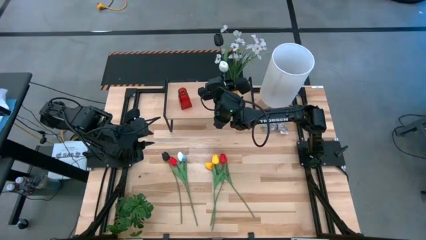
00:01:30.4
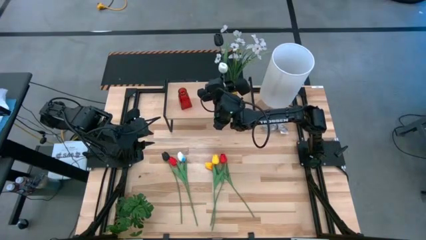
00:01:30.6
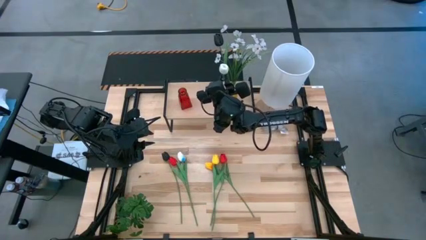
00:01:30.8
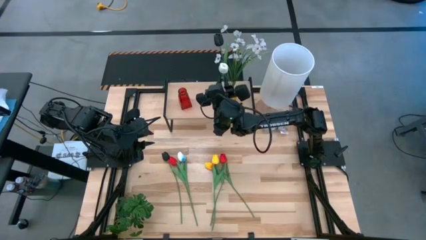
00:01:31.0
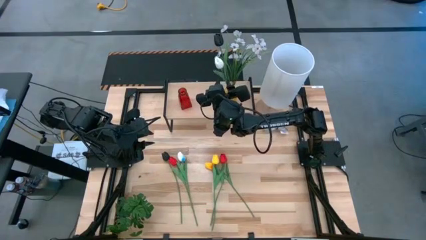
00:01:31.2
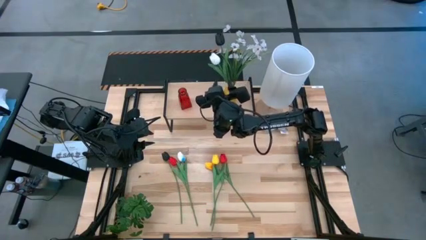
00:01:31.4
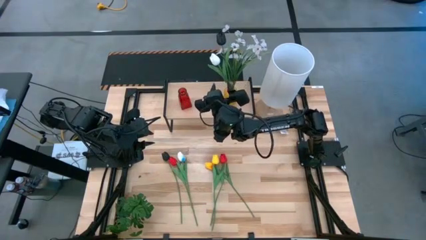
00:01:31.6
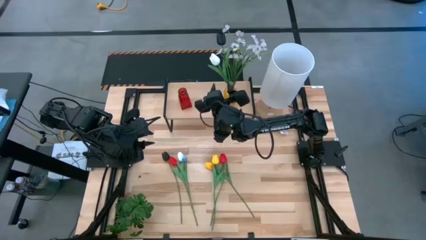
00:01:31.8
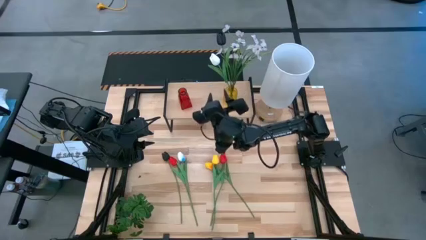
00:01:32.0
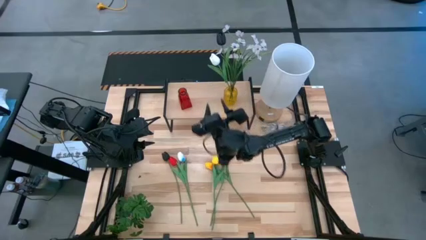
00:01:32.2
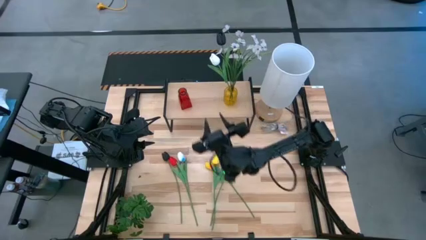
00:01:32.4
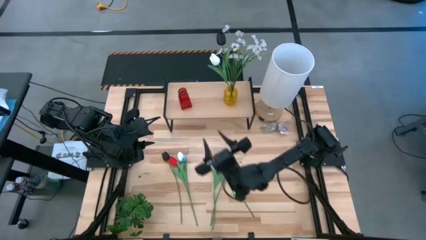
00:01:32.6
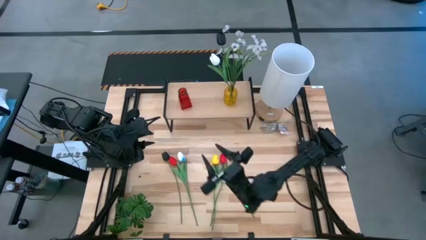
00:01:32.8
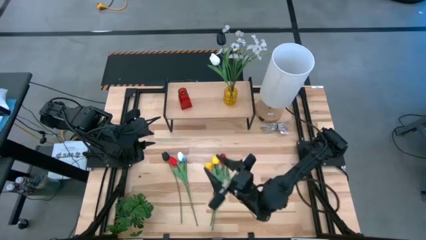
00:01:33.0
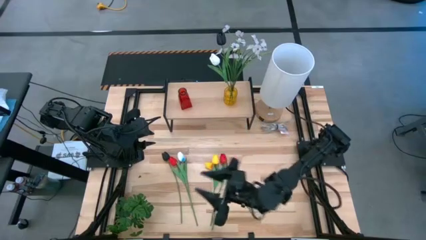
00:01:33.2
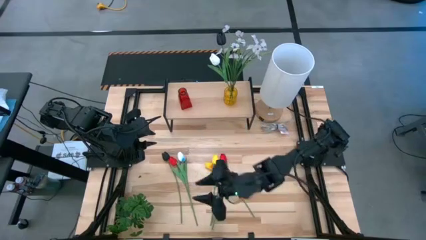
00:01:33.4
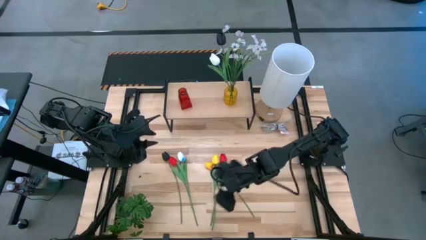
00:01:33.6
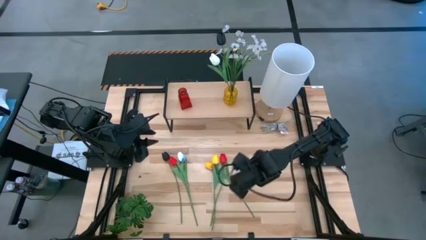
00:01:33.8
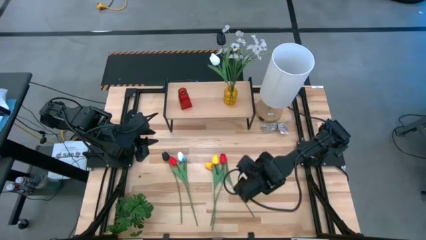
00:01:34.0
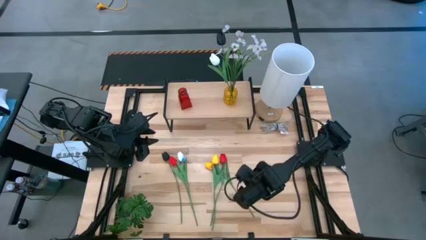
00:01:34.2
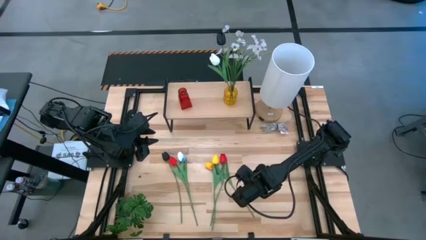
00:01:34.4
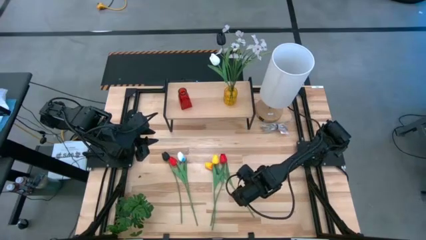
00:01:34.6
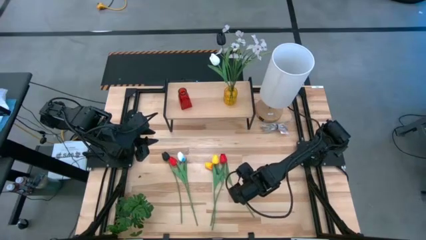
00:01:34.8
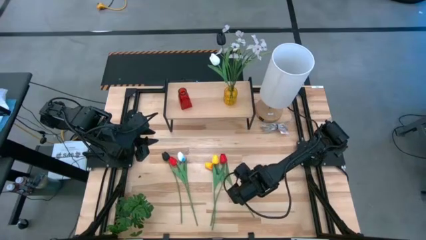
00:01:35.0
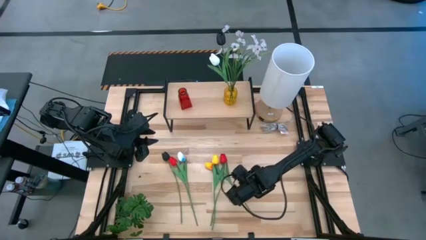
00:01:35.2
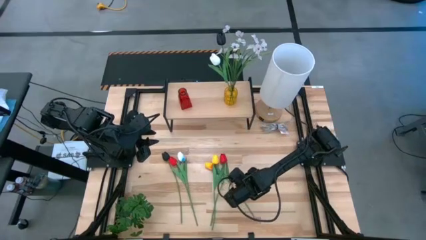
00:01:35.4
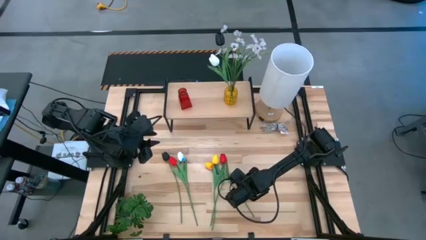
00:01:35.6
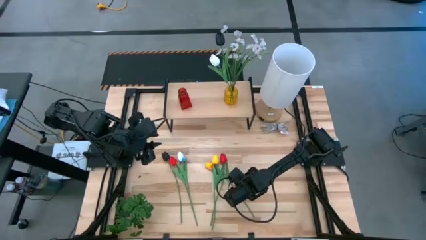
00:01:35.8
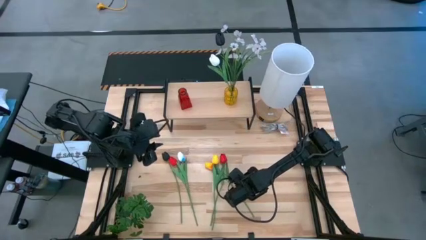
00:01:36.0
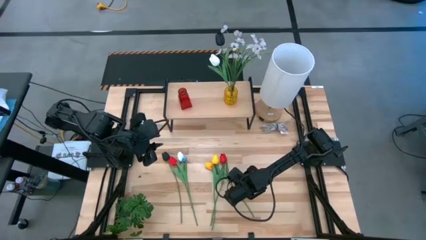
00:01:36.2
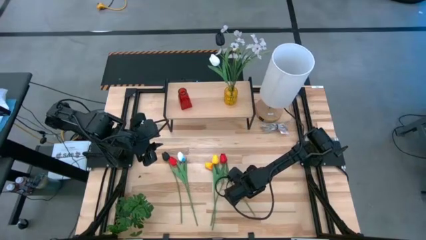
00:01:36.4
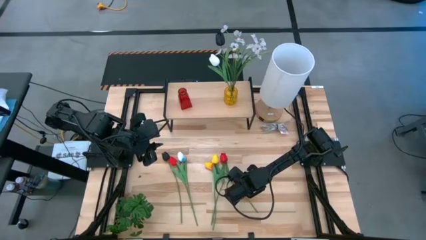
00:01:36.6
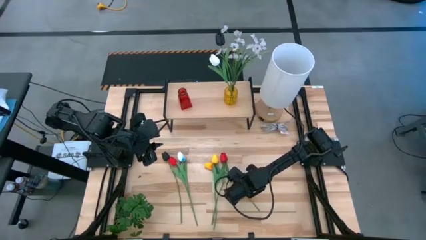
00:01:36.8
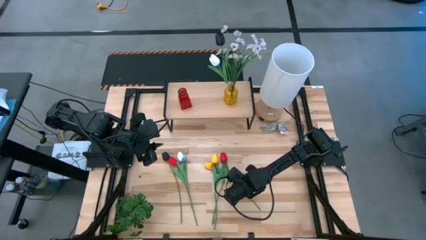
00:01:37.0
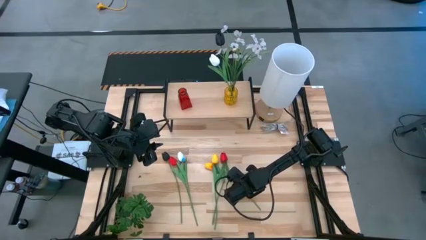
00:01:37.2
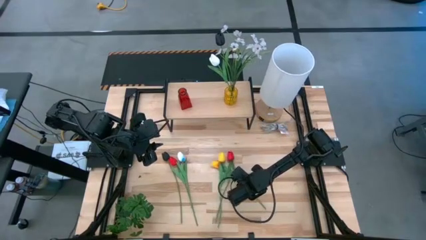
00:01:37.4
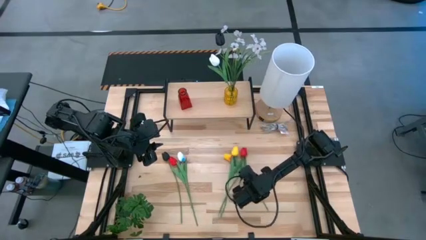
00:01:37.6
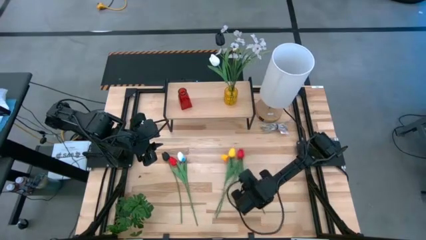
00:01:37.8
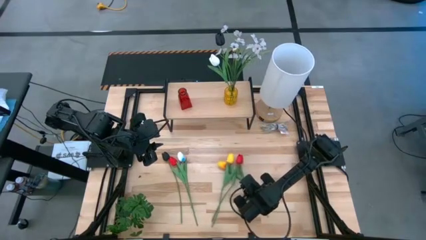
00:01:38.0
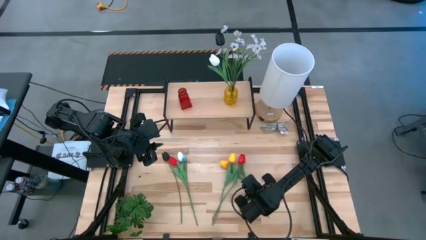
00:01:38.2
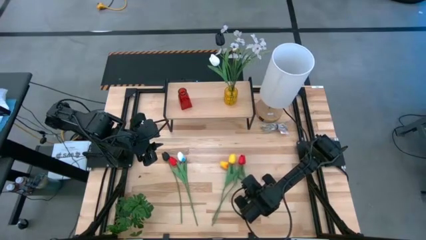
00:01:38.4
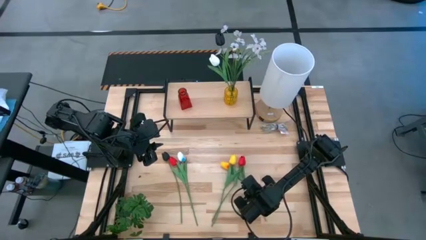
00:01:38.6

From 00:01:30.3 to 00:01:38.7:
Task: Pick and place flowers into a vace then onto a shelf
Put the right red tulip into the yellow flower vase

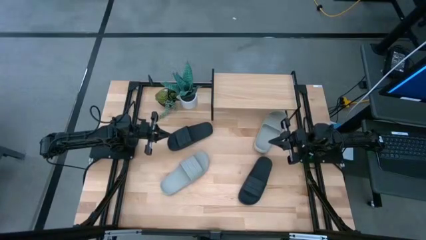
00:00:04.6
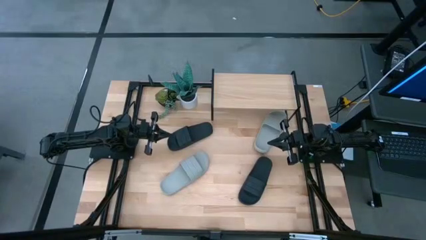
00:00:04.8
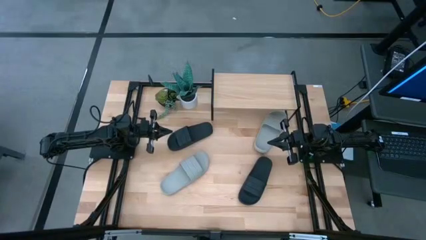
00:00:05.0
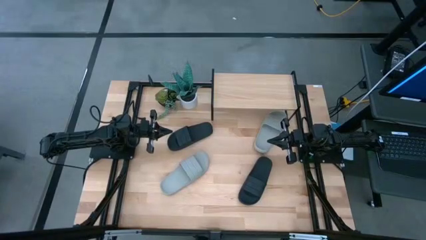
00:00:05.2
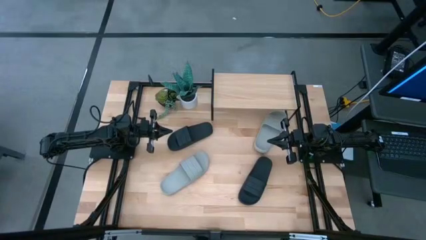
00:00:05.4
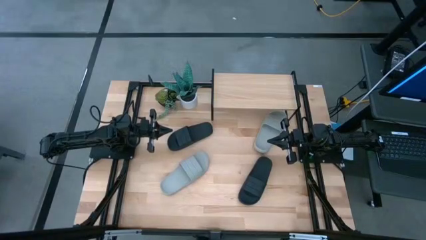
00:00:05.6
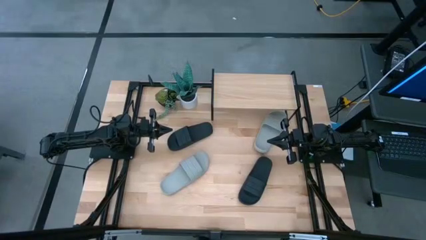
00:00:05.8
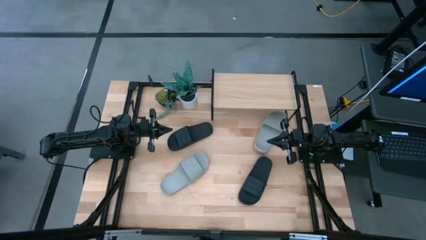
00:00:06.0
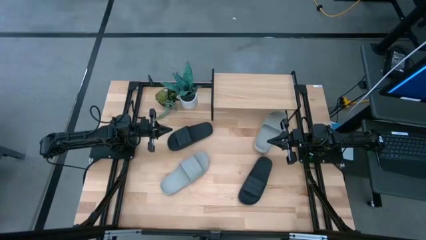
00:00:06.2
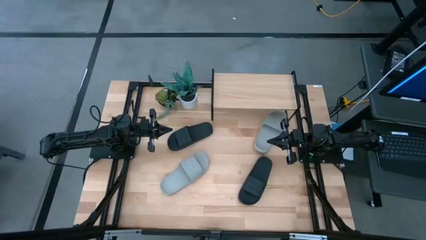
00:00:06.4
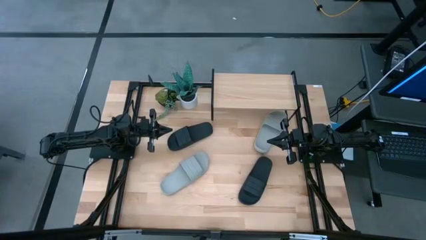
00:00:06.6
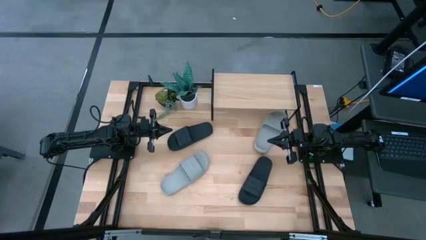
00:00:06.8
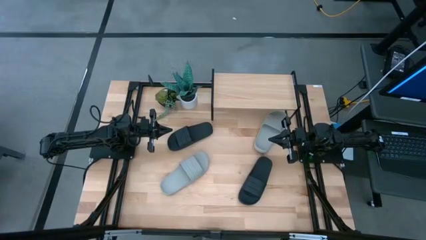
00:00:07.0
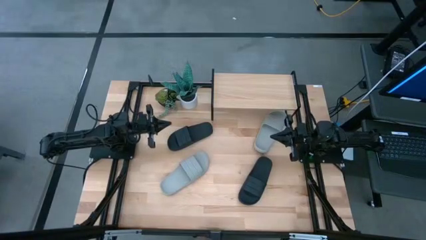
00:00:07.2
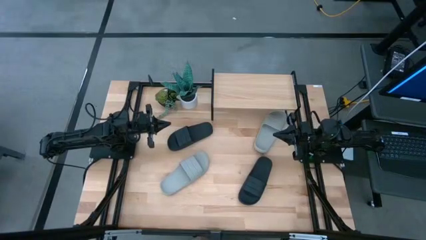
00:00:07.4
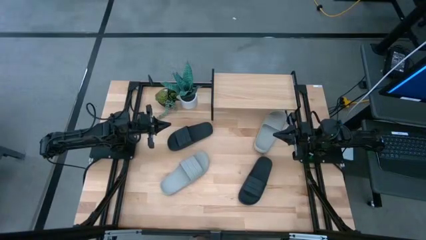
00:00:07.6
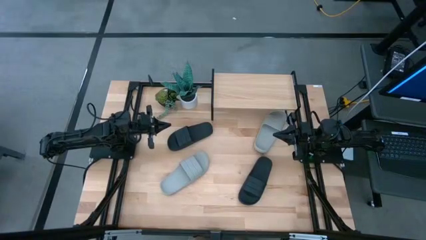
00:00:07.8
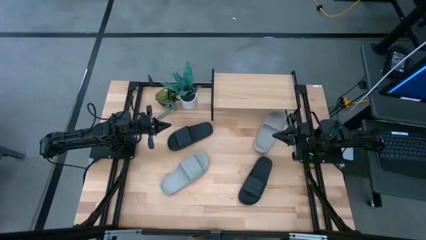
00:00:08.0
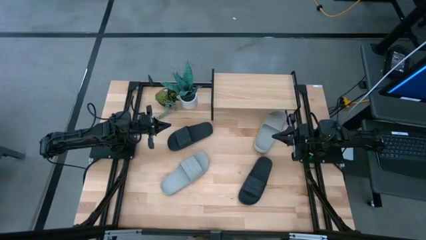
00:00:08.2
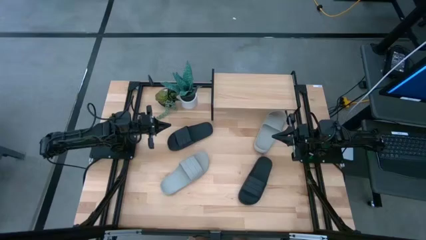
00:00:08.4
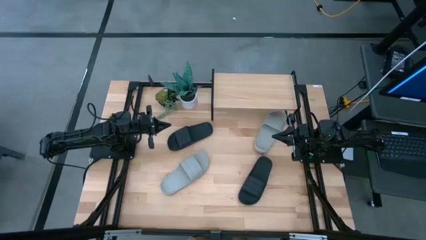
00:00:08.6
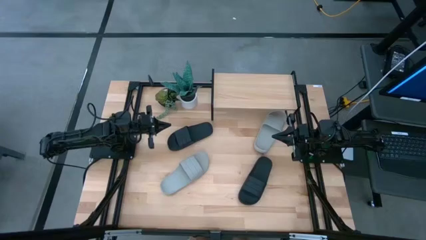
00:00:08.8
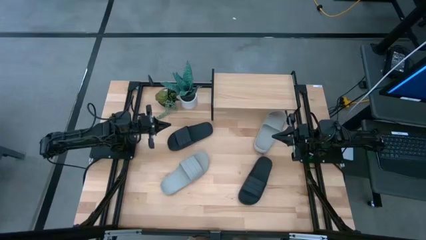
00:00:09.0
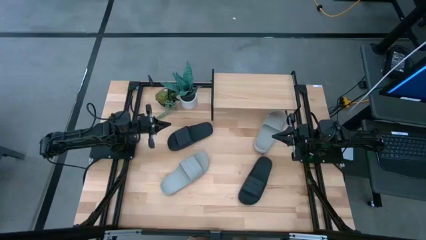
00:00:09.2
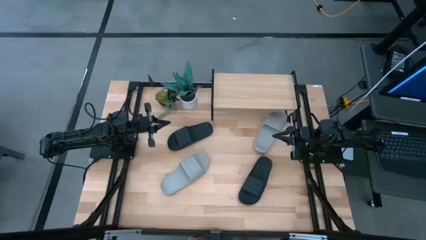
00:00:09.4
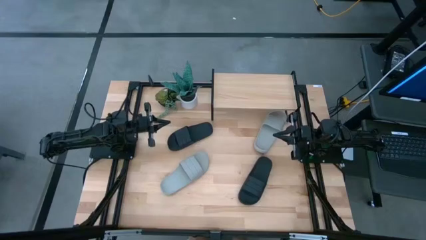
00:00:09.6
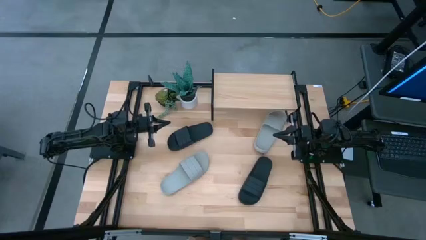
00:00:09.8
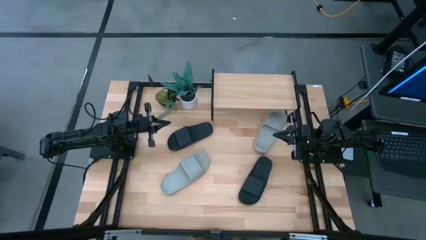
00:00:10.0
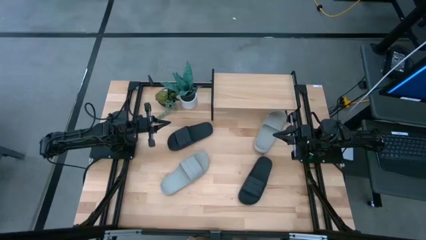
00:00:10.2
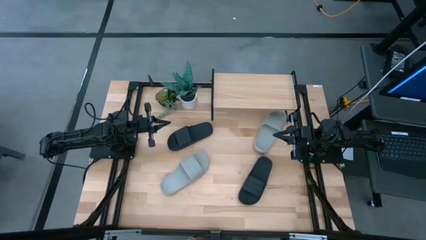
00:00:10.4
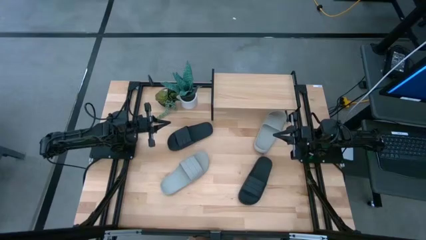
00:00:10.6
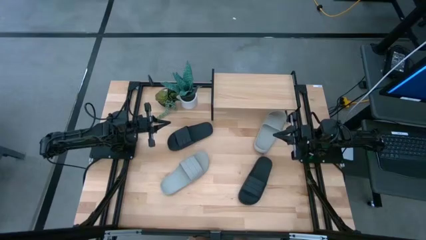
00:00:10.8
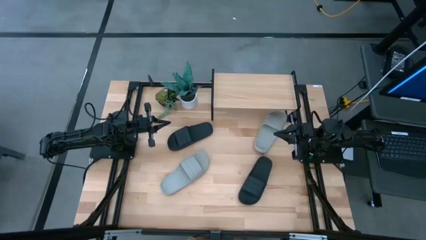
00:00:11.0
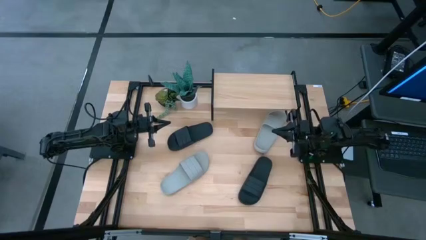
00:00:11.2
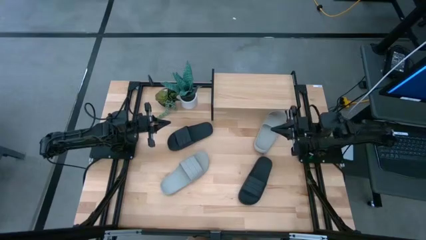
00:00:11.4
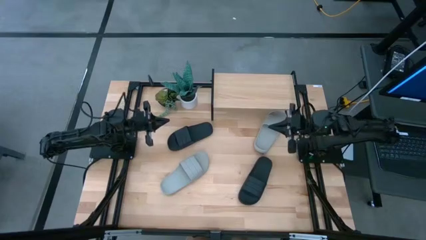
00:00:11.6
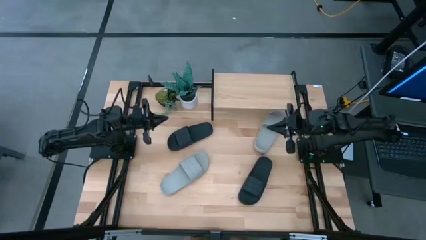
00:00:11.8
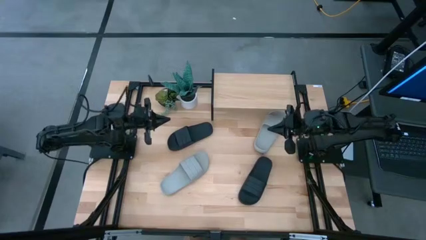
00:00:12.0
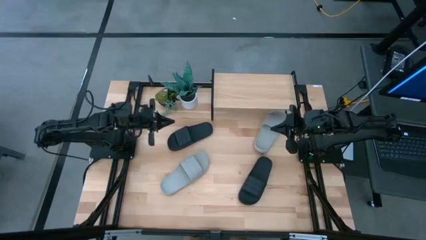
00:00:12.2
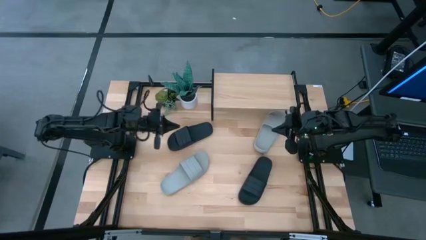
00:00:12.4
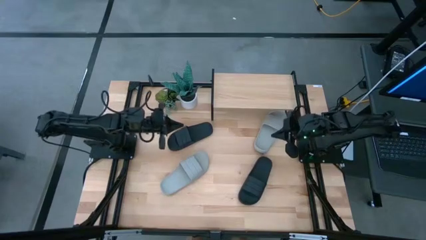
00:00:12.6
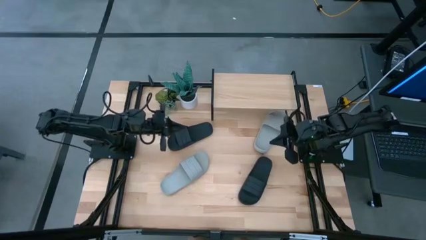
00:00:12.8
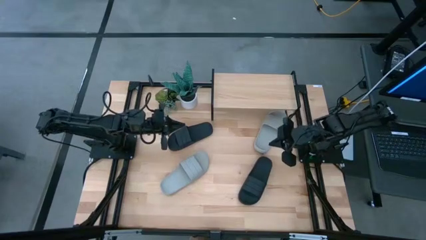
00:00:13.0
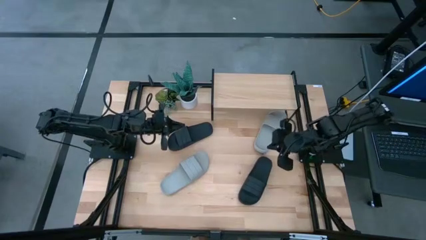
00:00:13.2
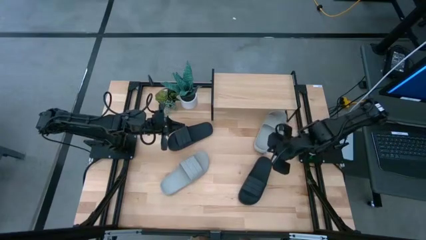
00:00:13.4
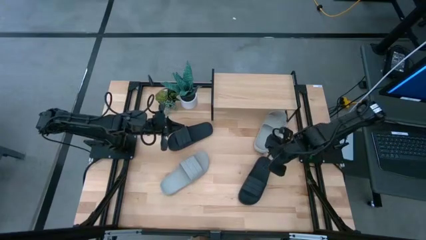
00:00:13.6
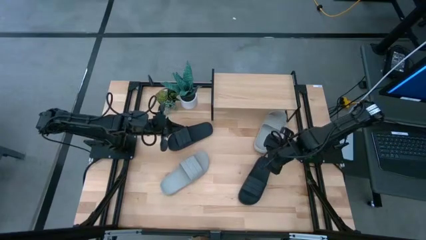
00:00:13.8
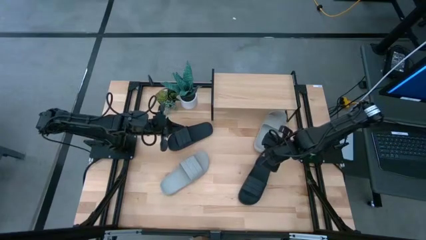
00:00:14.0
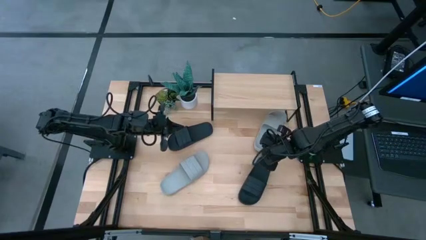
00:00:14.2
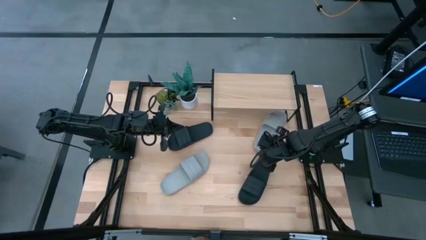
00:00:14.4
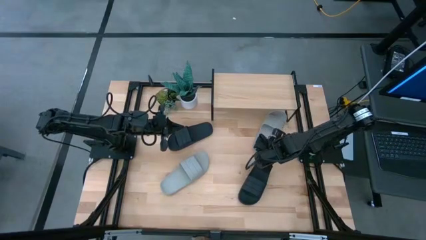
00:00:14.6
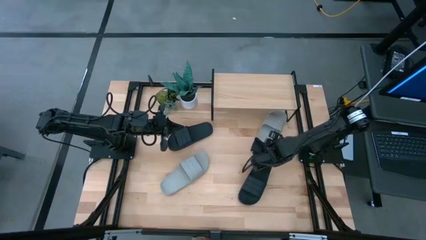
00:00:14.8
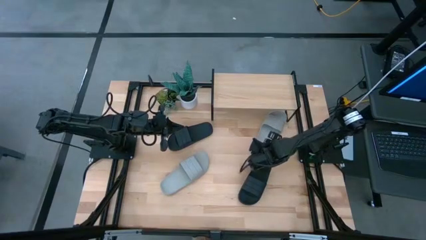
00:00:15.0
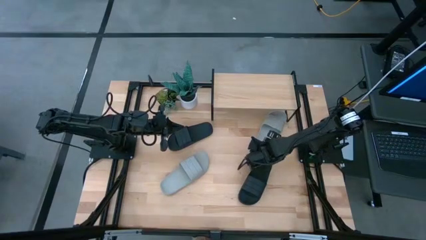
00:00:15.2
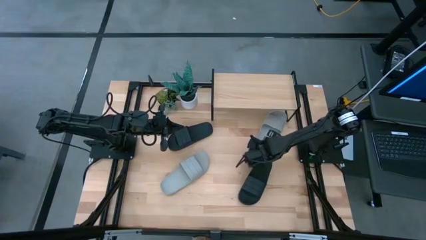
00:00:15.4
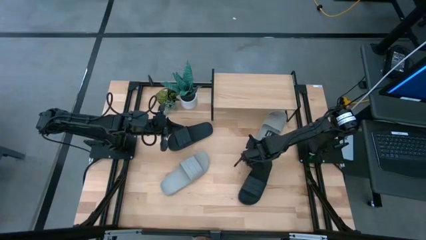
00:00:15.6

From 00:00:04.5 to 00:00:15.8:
Task: Pick and place slides into the shelf
Put the right gray slipper on the shelf
